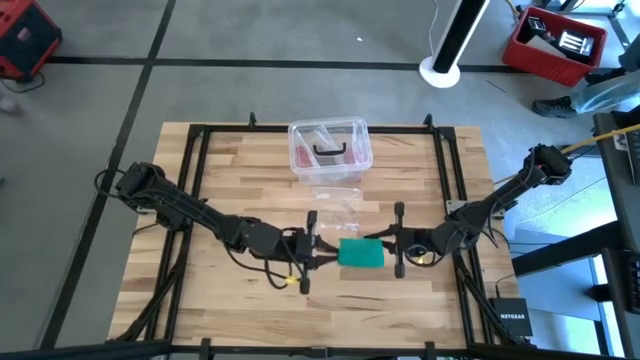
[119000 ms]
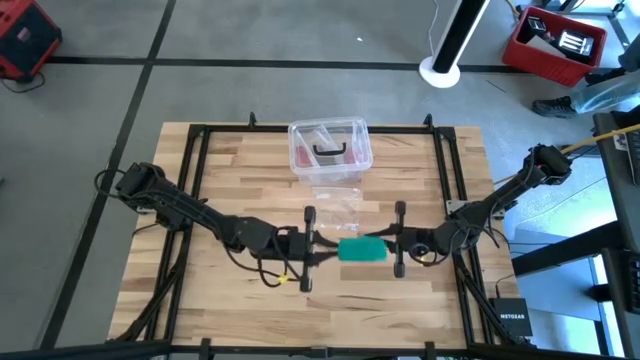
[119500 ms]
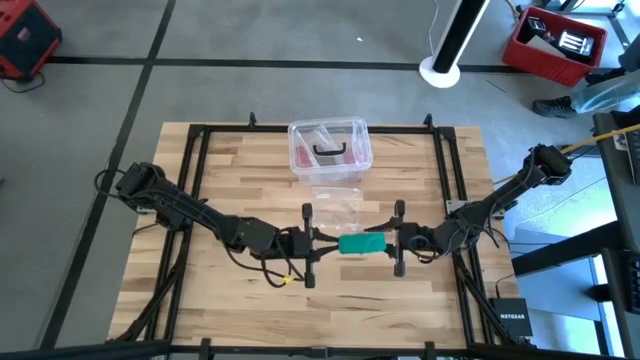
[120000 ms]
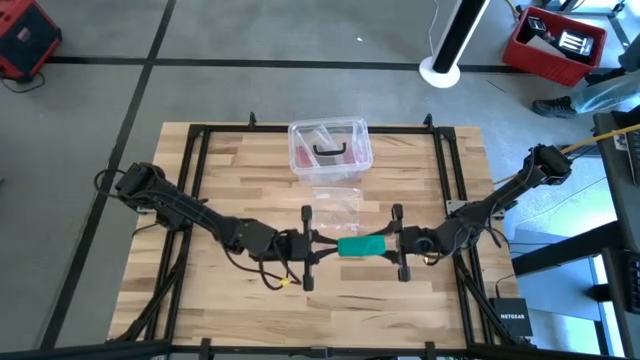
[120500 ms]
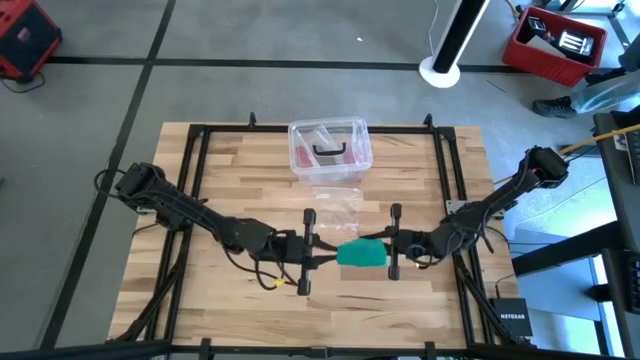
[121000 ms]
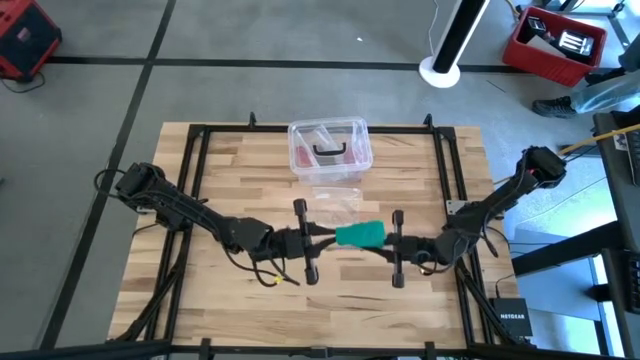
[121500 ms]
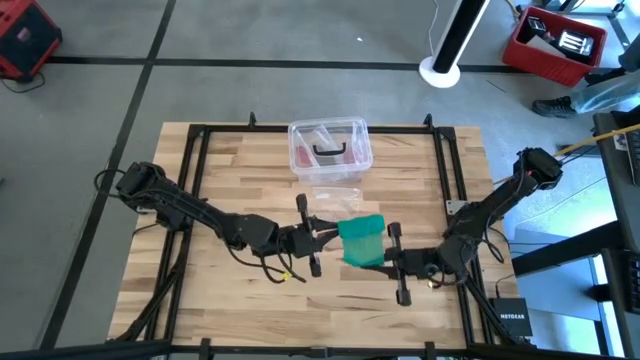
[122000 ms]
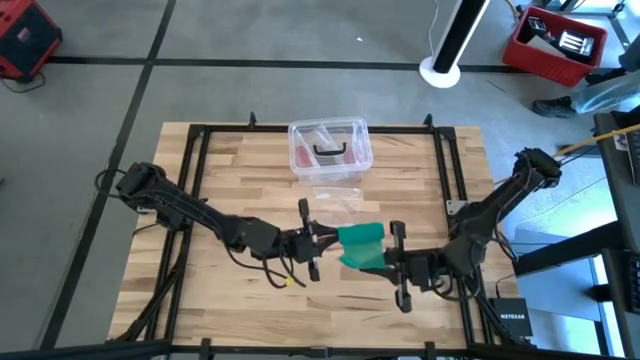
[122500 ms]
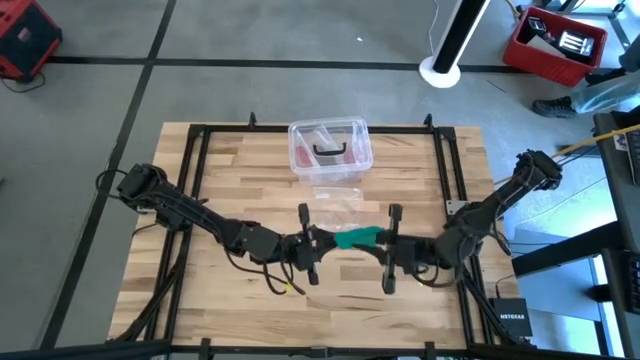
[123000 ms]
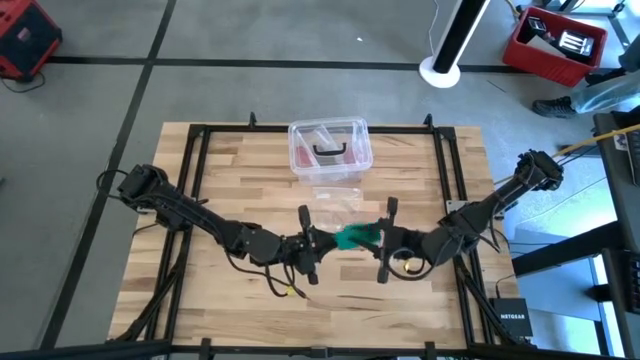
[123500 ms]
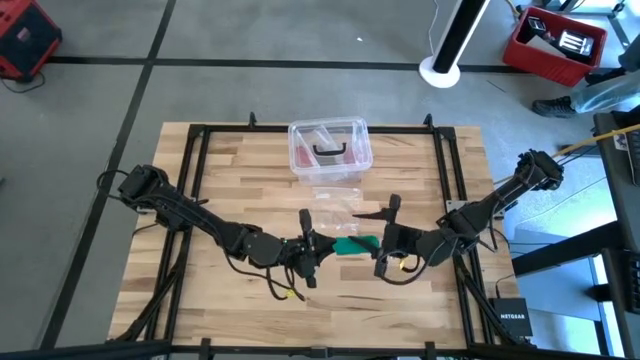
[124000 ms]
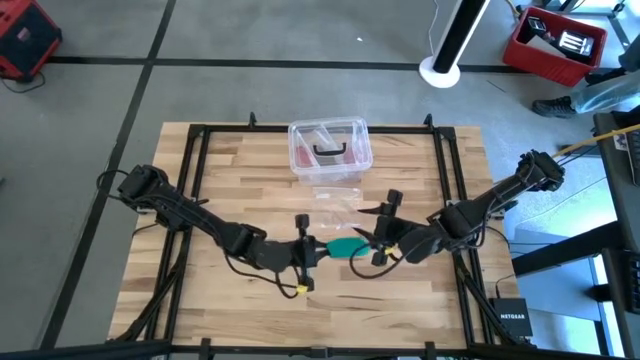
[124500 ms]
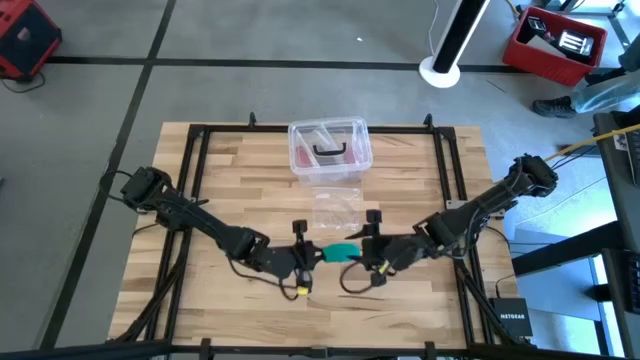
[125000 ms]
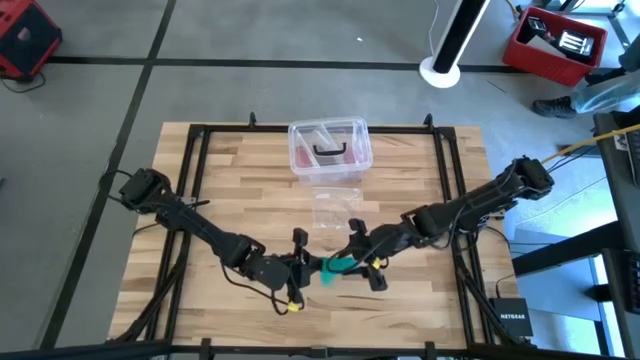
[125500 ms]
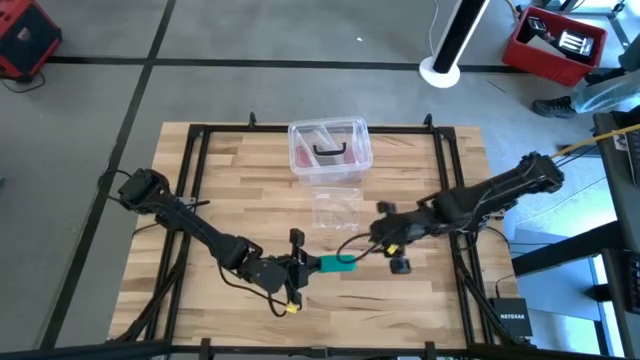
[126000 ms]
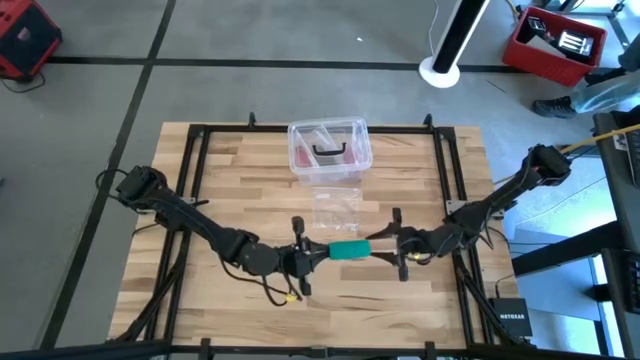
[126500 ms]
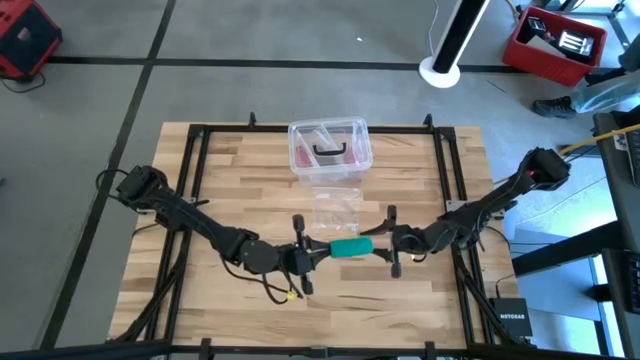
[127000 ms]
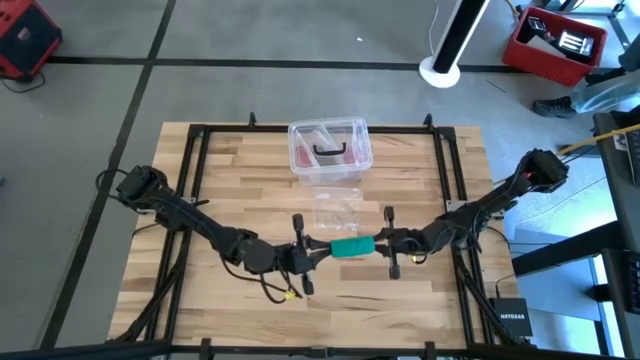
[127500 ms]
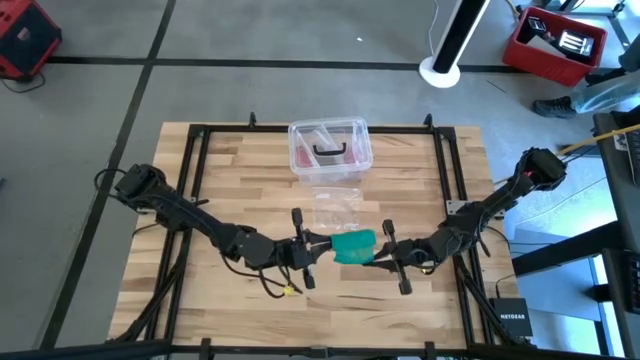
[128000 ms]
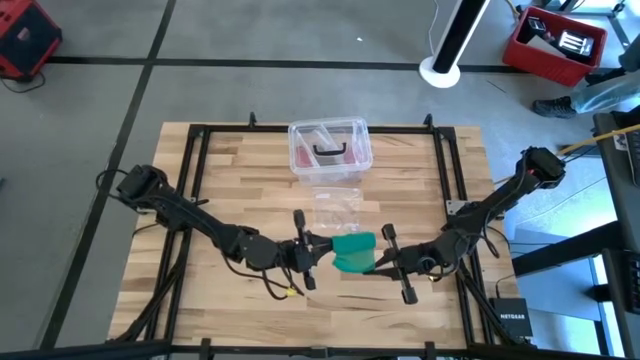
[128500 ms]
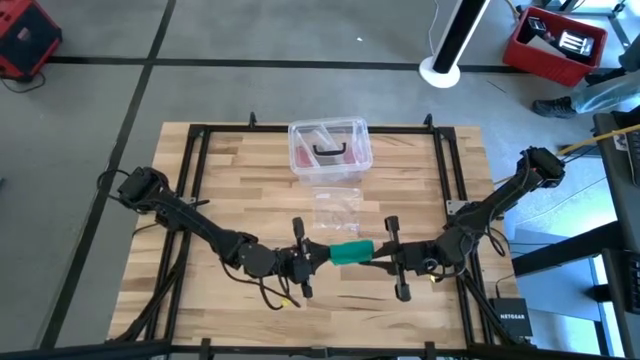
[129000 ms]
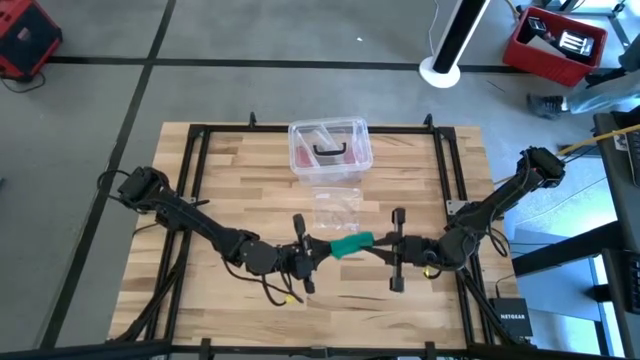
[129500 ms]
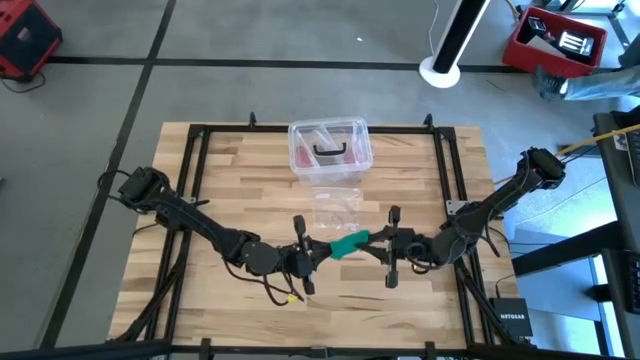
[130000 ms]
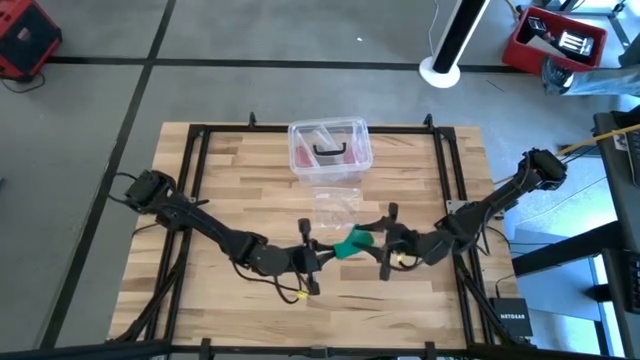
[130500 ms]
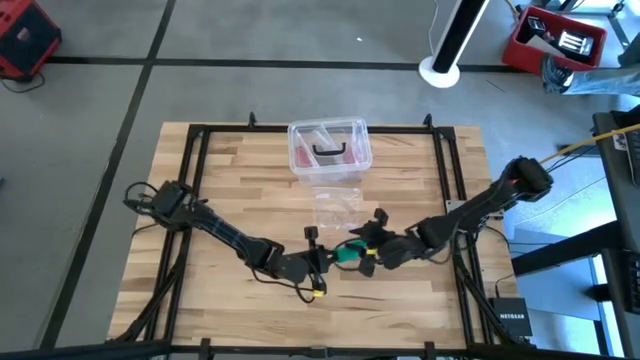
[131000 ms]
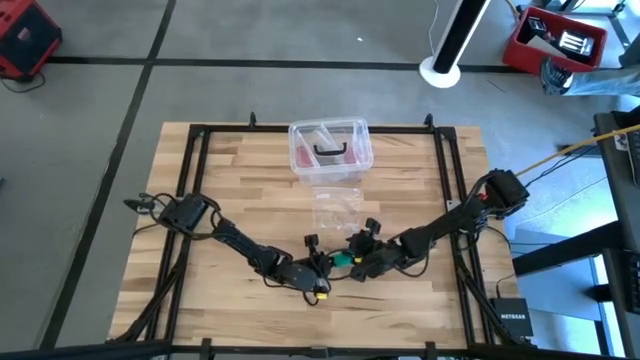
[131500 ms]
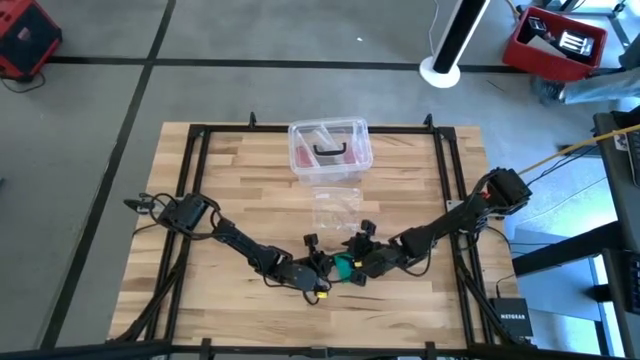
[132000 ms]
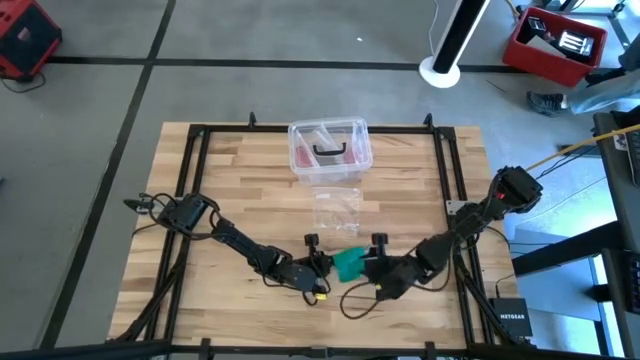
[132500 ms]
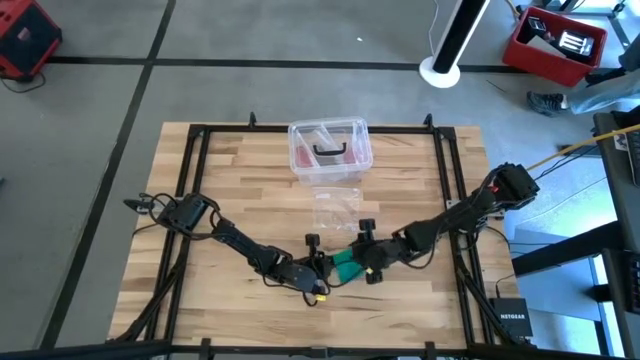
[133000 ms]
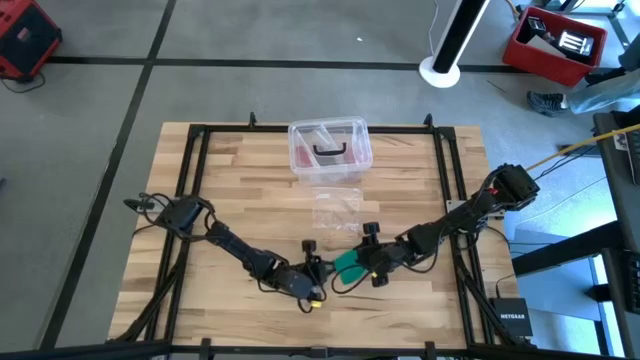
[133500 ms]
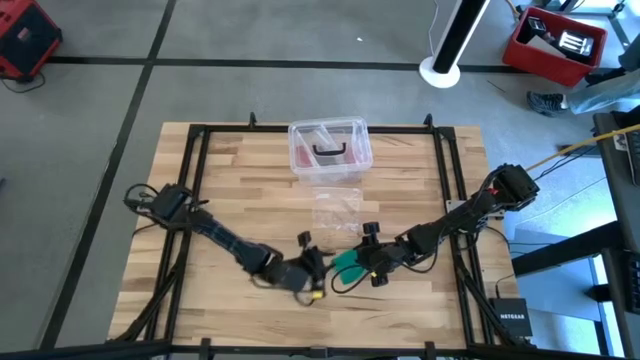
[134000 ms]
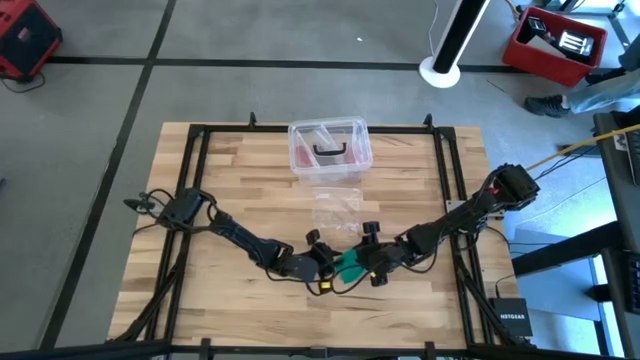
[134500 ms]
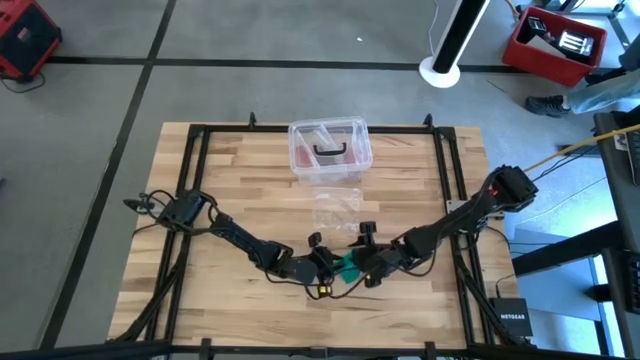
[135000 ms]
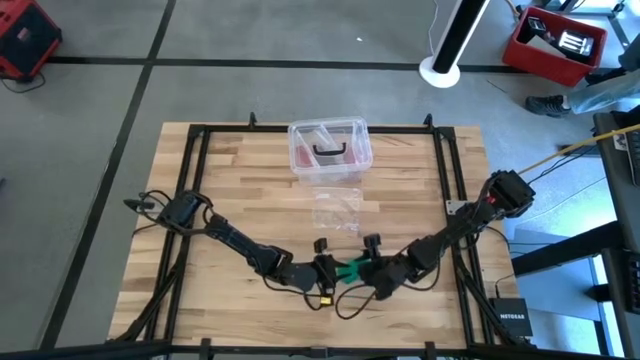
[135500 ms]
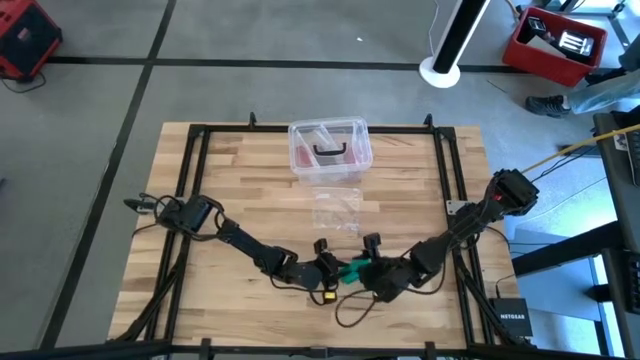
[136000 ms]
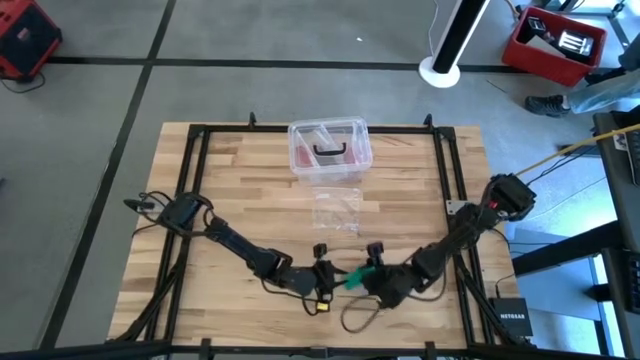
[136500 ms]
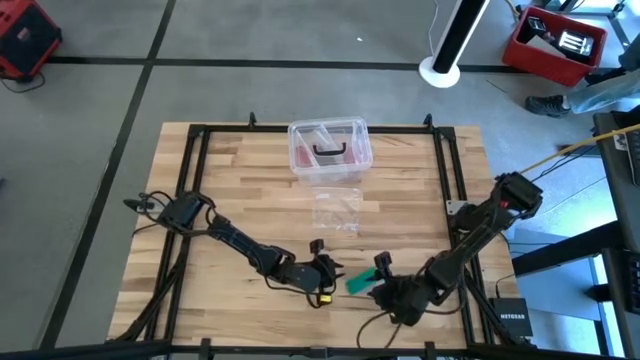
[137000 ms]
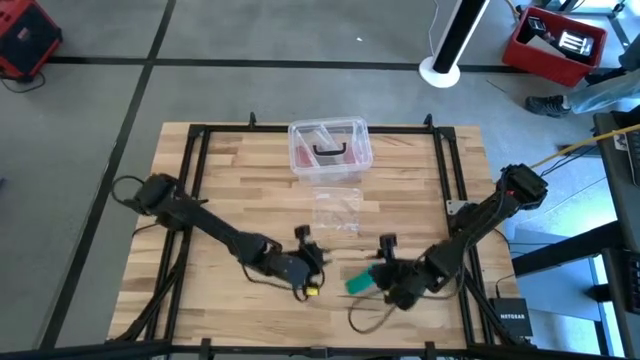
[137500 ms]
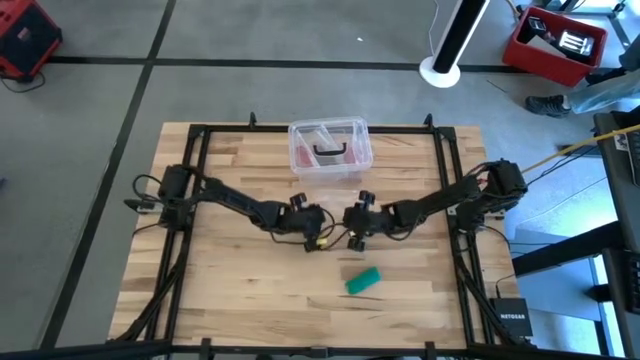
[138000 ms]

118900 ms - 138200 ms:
Task: Roll bandage
Roll the green bandage

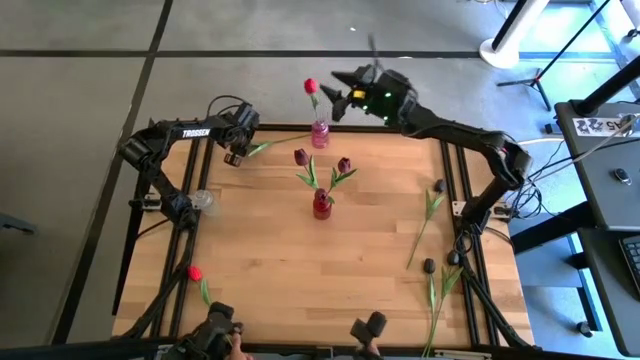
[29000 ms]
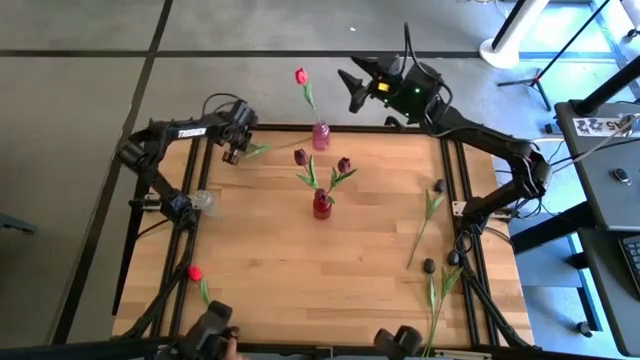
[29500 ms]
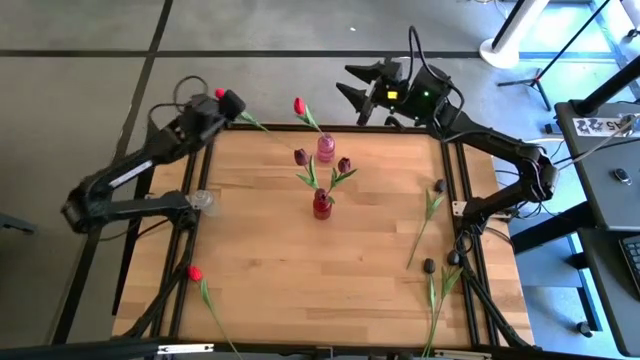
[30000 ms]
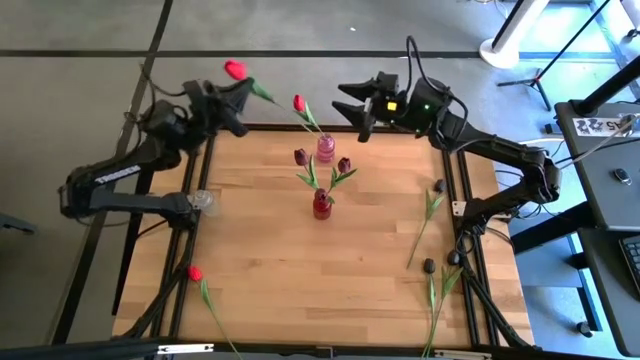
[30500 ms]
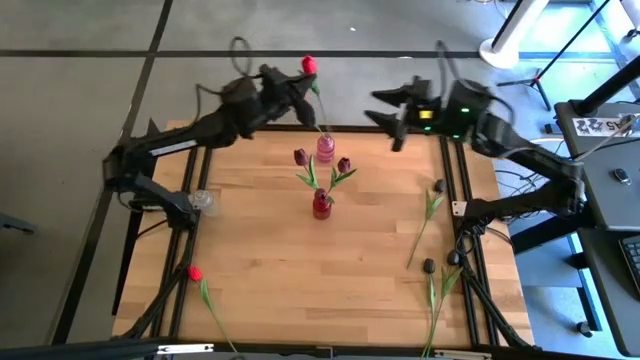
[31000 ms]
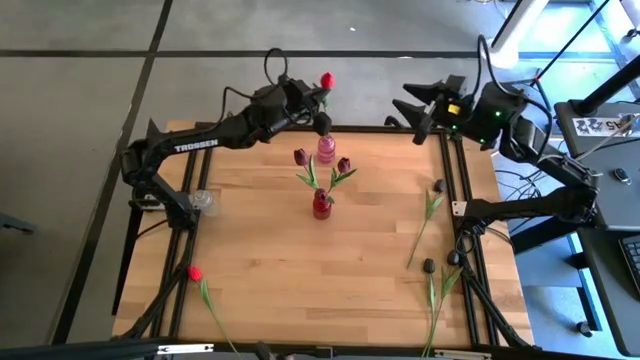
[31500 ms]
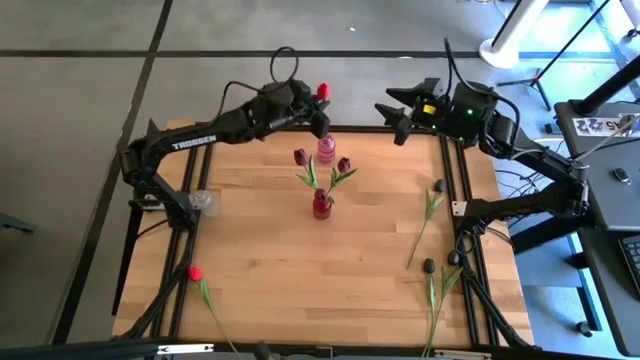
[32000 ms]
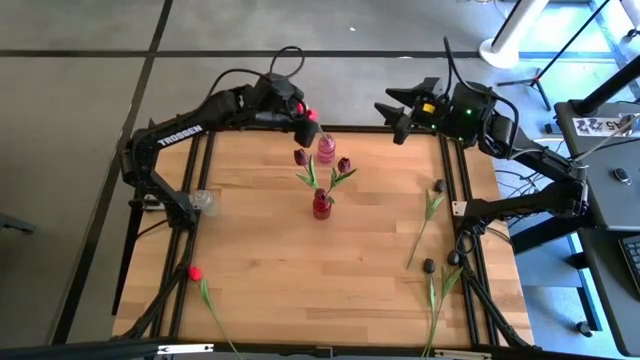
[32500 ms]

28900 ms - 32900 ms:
Task: Sort flowers into vase by color
Put the top left red flower into the purple vase
